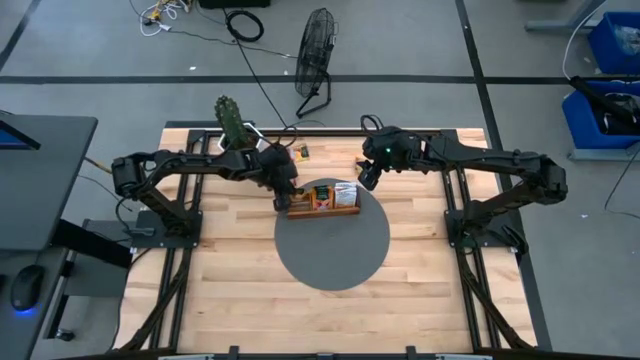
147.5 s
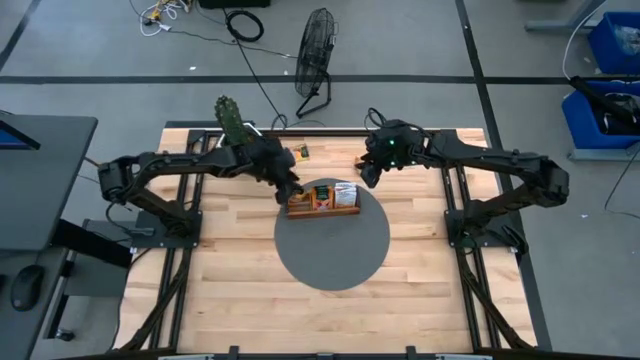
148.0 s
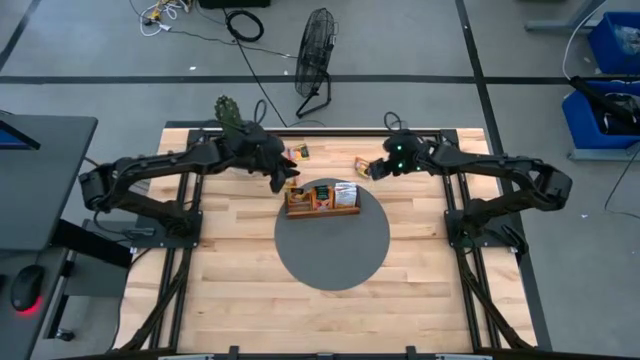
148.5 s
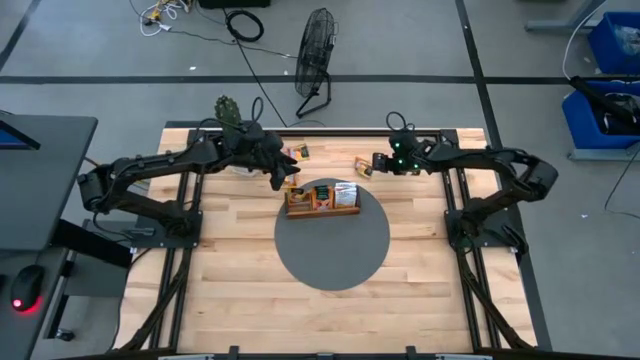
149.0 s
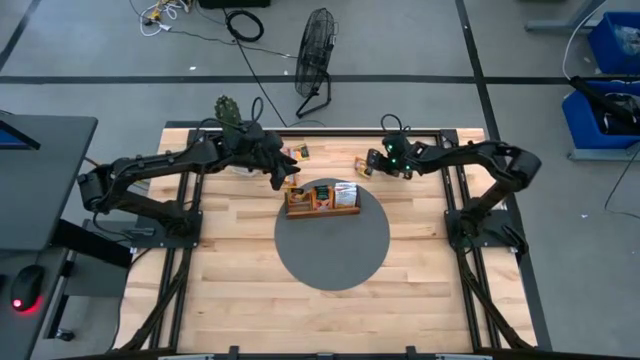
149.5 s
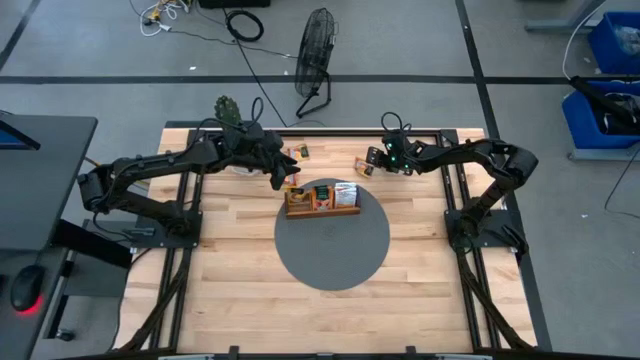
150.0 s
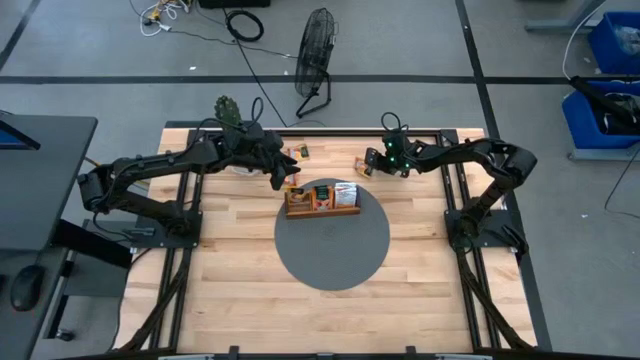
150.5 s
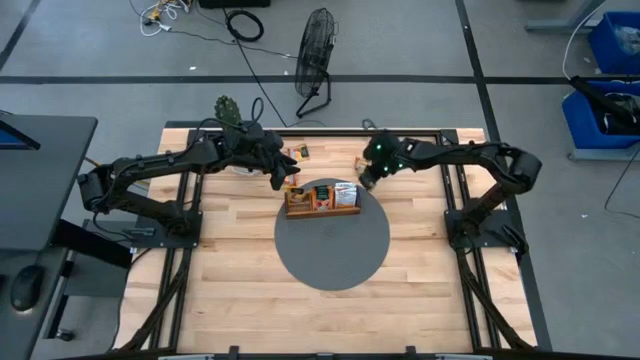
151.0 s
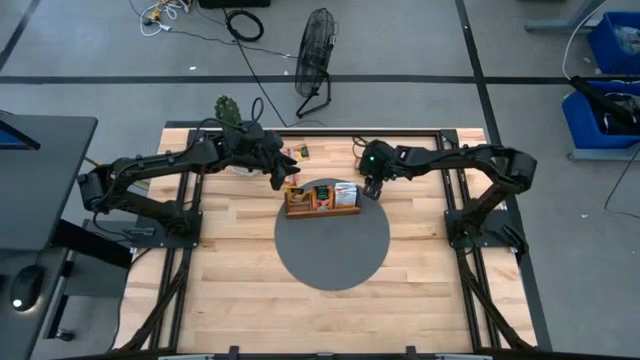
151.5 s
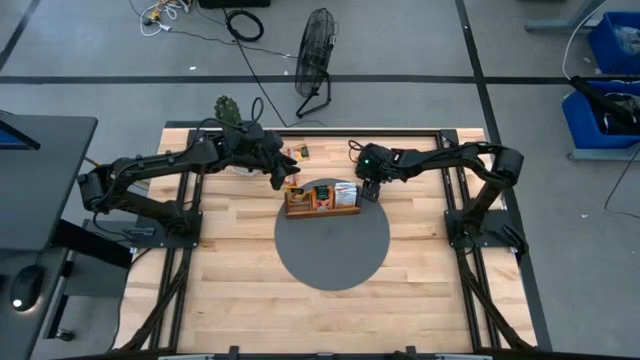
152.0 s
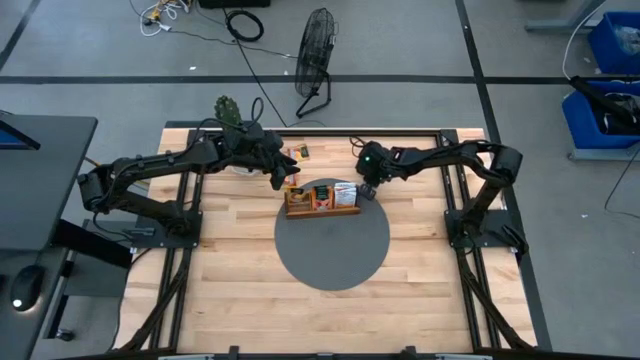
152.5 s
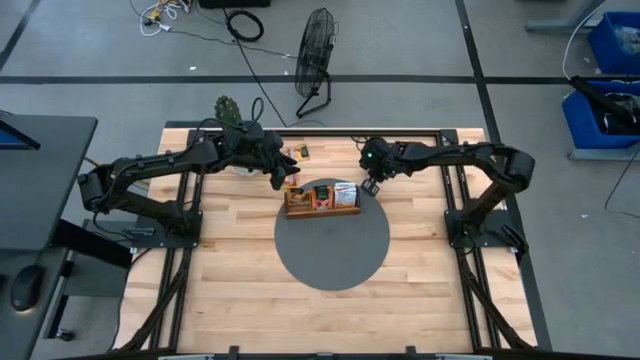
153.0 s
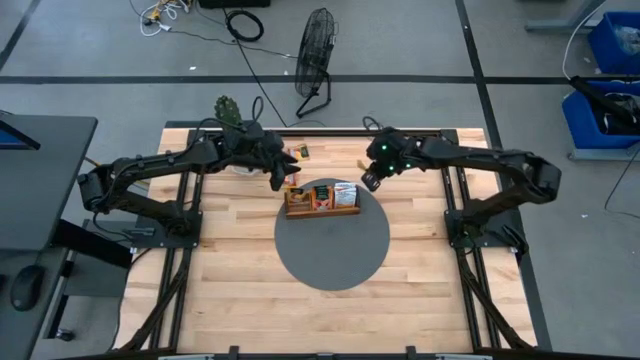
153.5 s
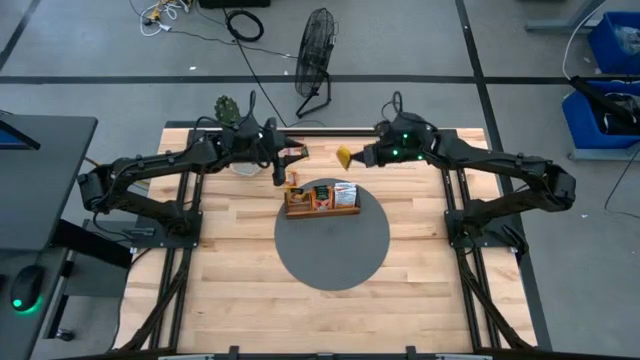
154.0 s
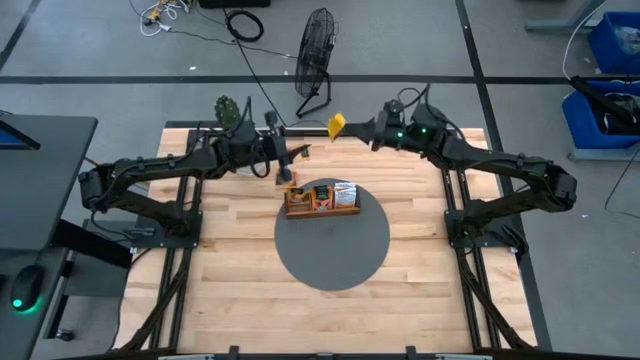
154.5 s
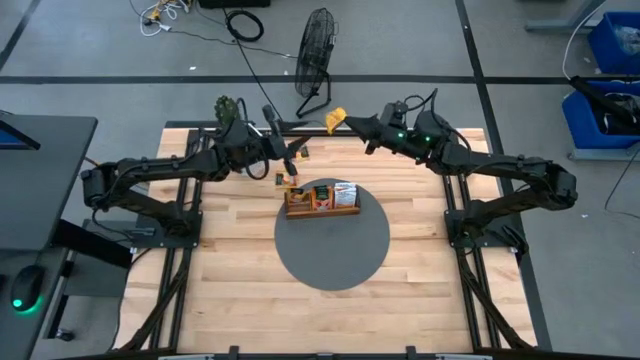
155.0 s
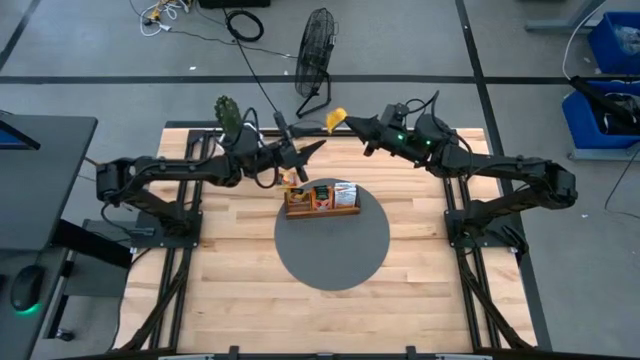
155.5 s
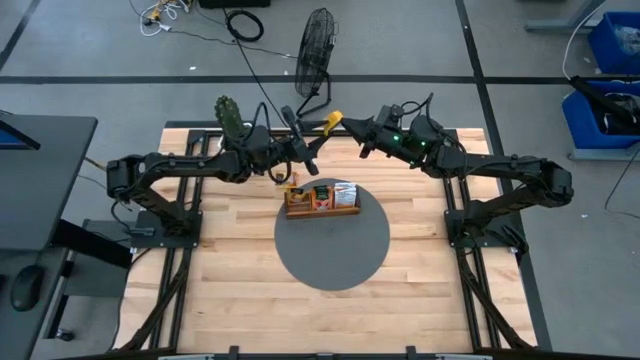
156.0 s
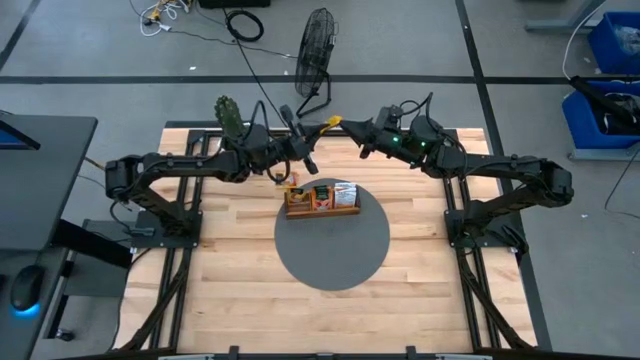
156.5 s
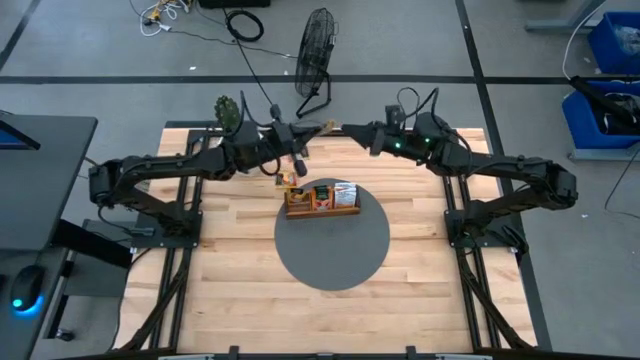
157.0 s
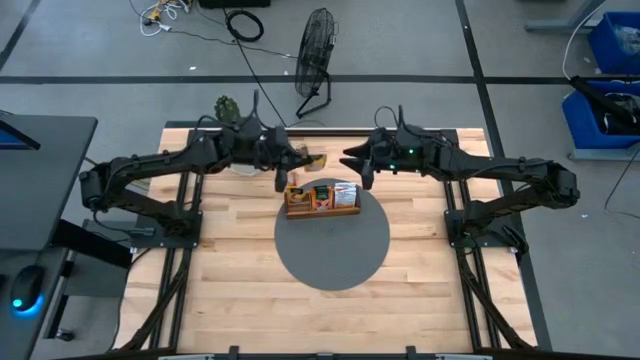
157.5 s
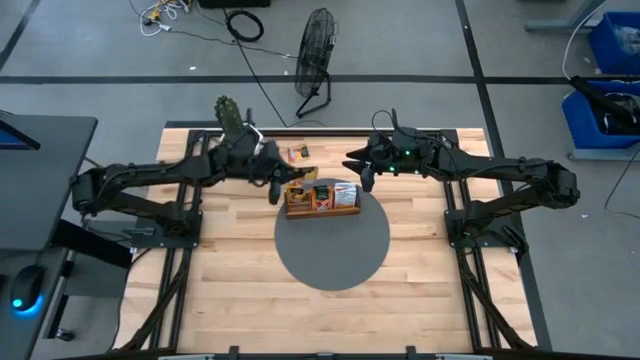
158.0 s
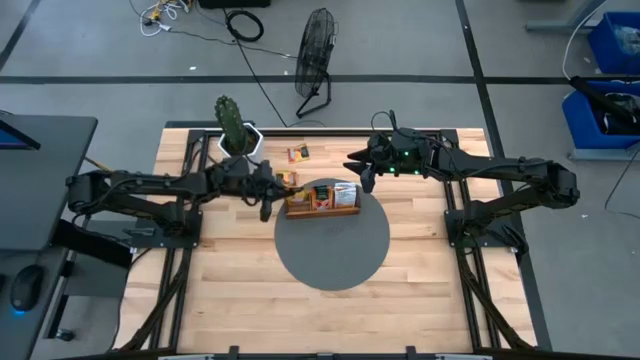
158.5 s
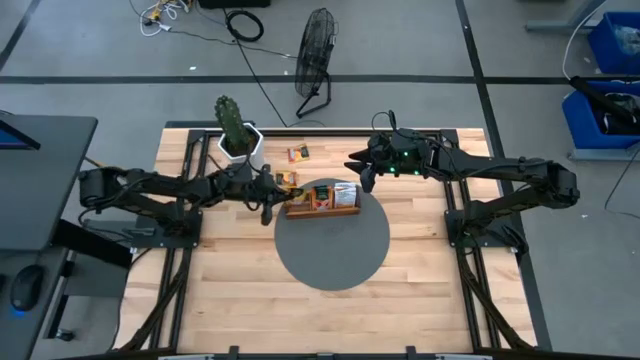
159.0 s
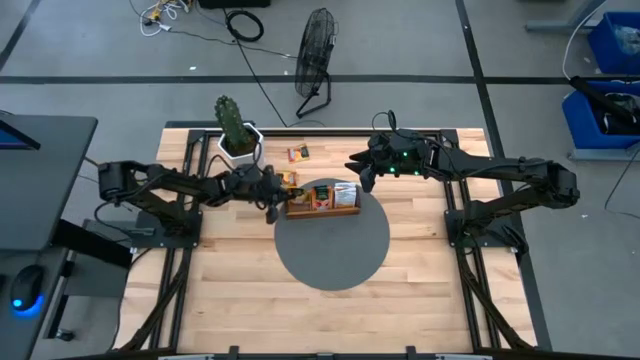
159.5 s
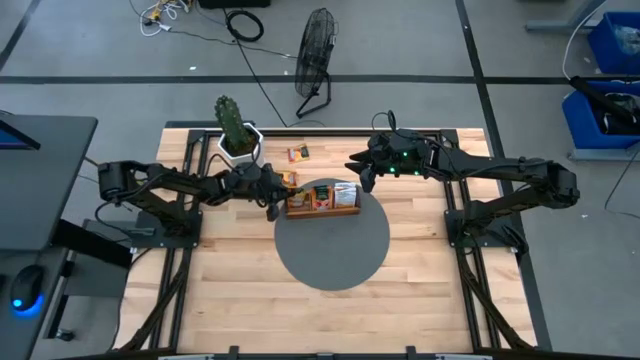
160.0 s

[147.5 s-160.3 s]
Task: Pick & Place Tea
Put the orange tea bag into the left section of the wooden organizer

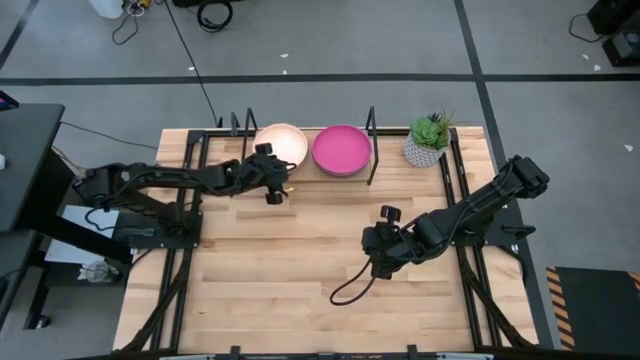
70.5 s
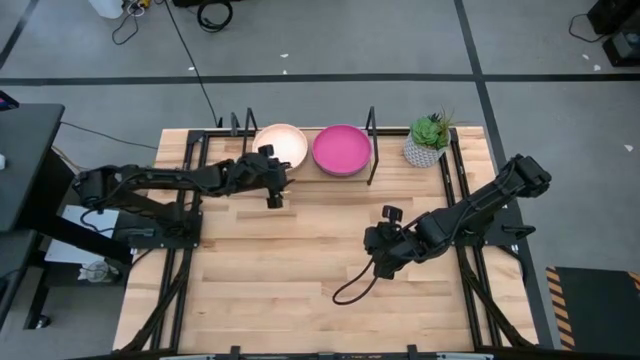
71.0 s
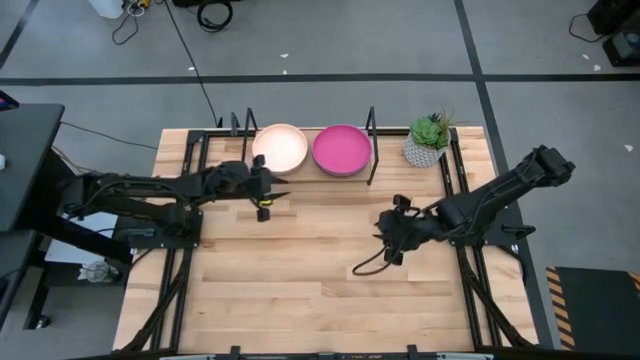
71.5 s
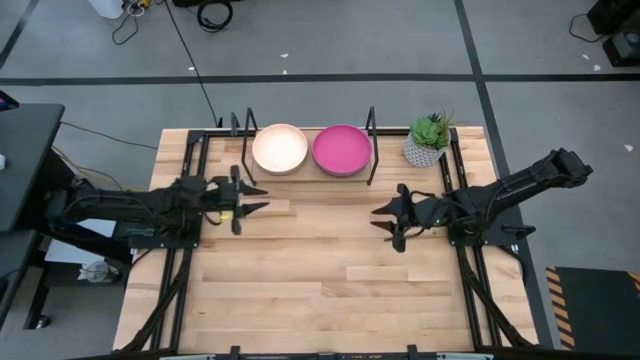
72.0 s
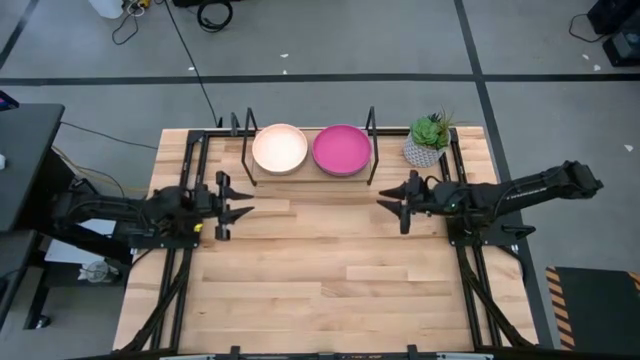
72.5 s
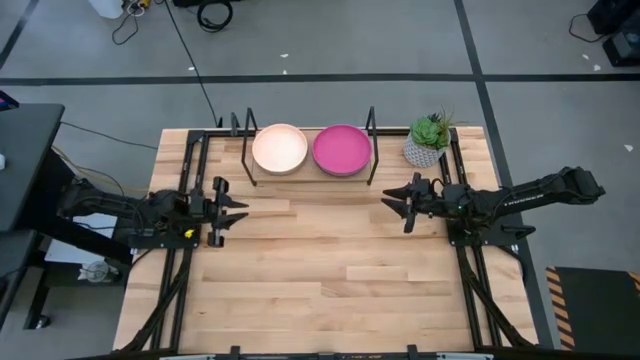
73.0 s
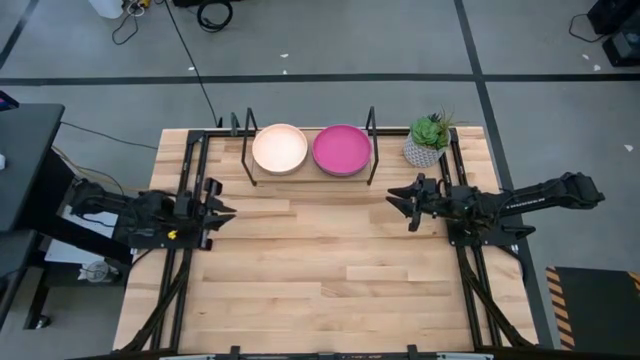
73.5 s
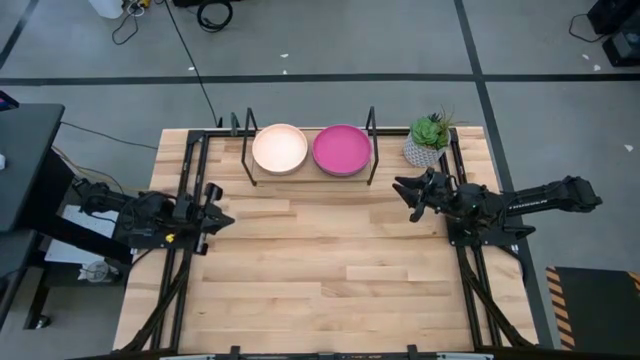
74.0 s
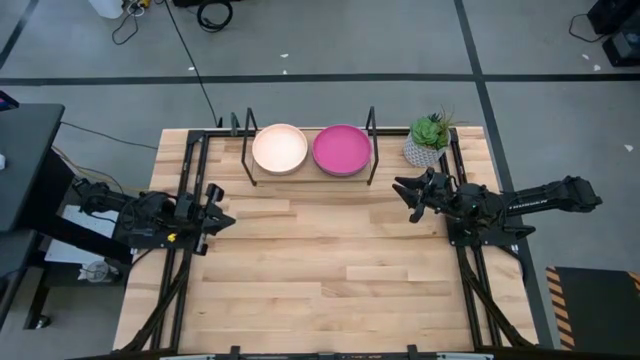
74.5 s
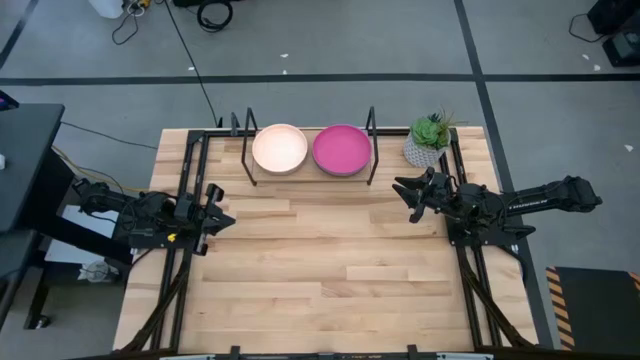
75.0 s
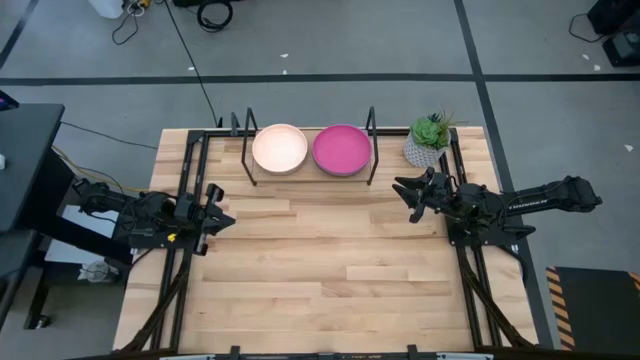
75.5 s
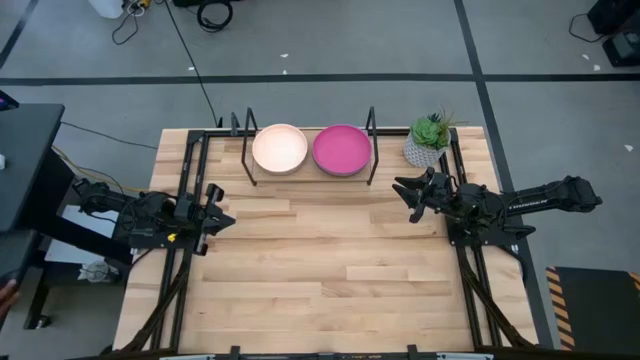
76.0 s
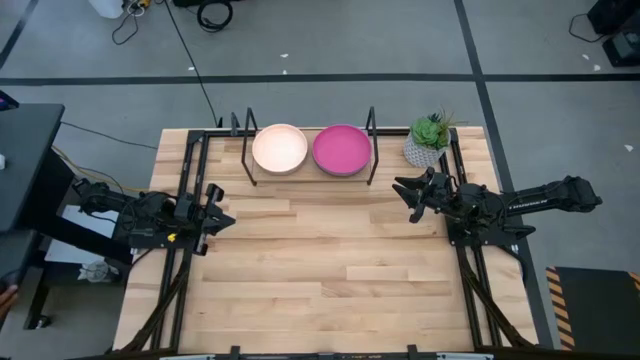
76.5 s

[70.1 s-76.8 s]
Task: Place and stack plates onto a shelf
Return to Home Position

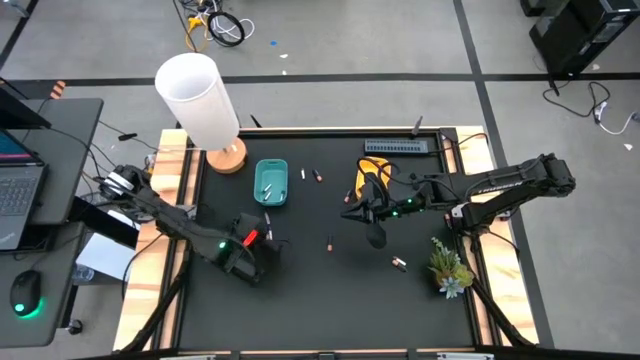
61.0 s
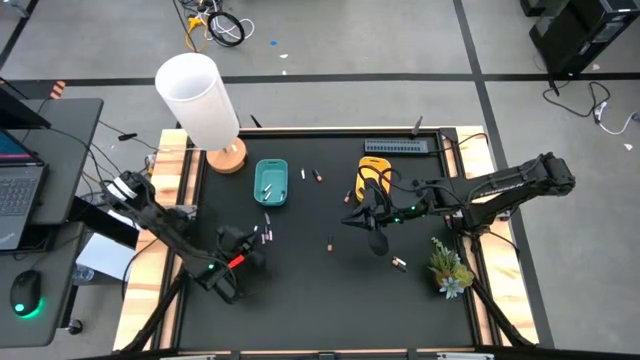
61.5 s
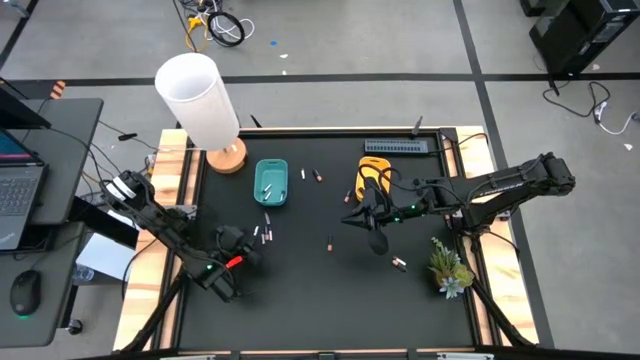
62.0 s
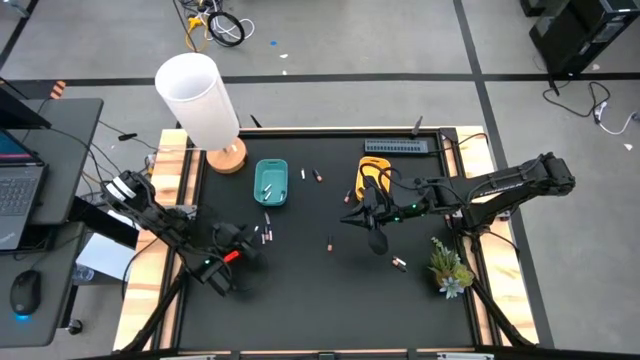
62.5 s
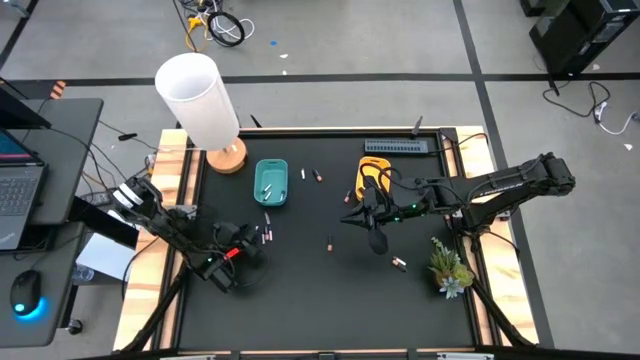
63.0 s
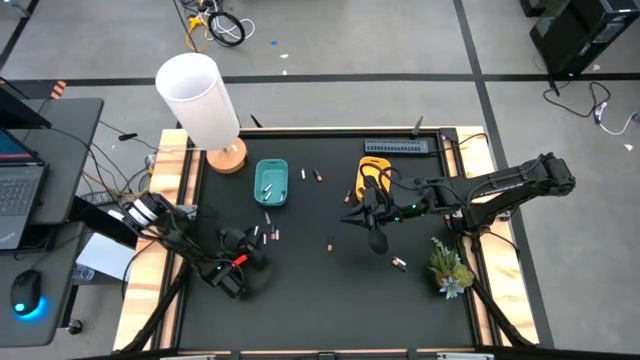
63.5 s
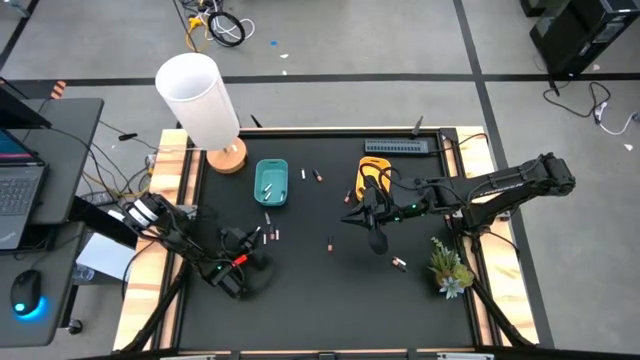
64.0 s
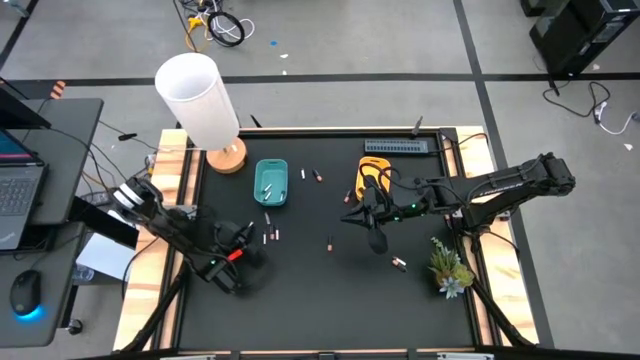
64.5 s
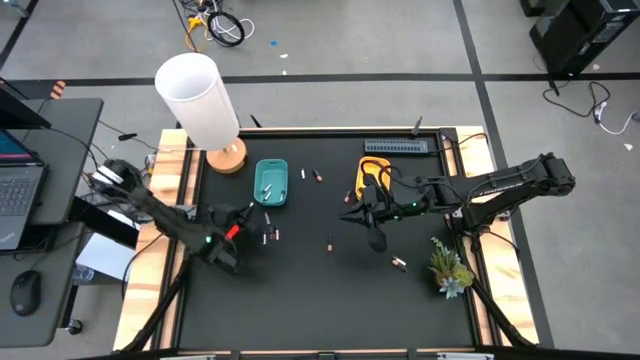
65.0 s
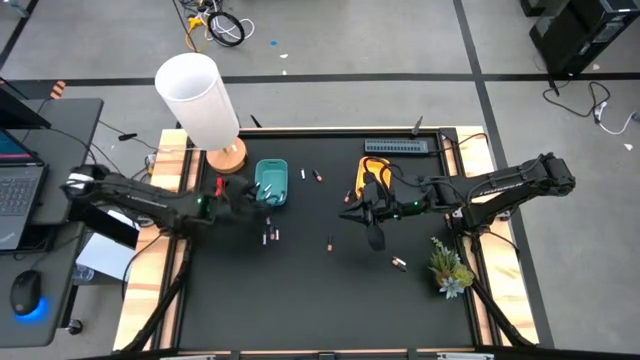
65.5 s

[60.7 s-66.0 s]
Task: Sort batteries
Put the silver battery into the blue bin
